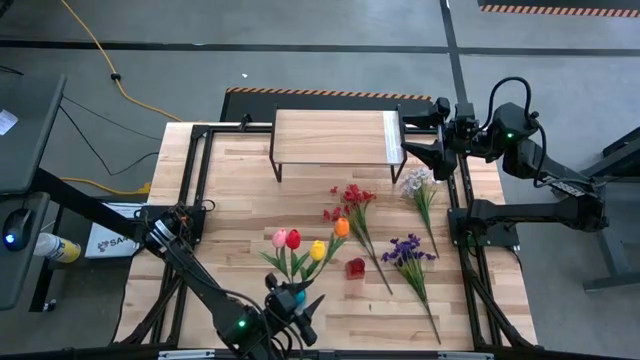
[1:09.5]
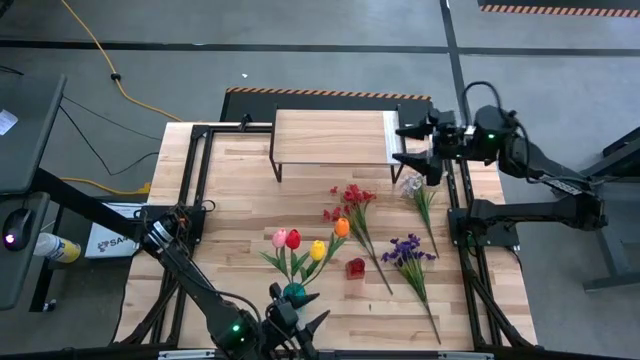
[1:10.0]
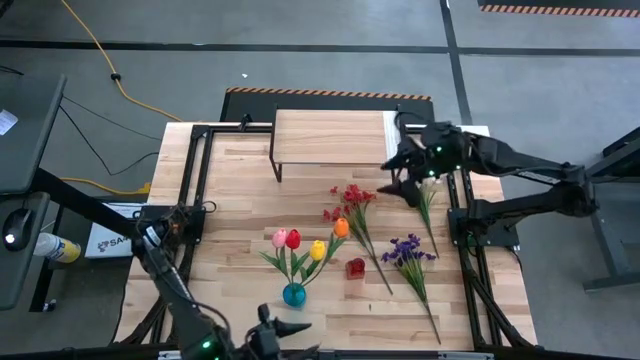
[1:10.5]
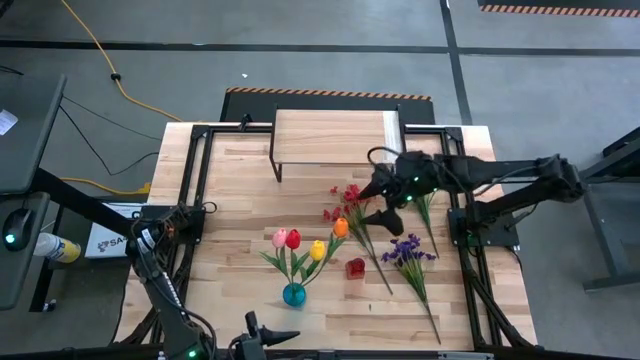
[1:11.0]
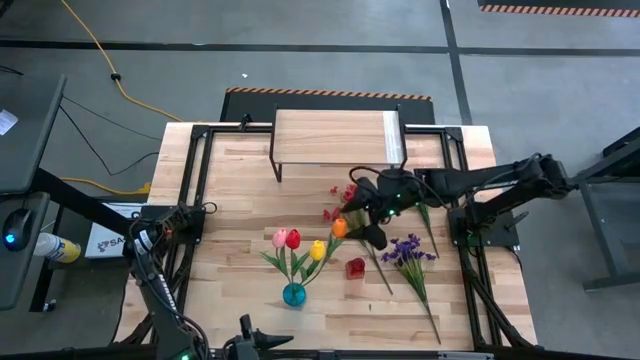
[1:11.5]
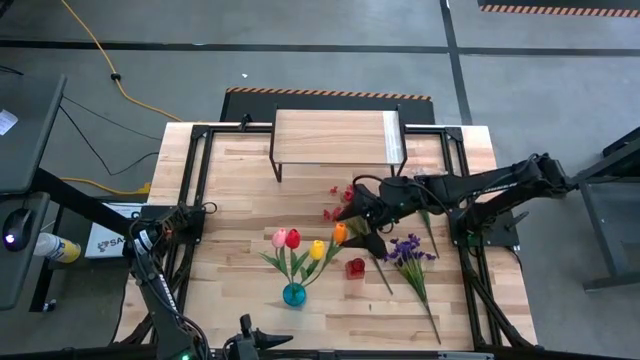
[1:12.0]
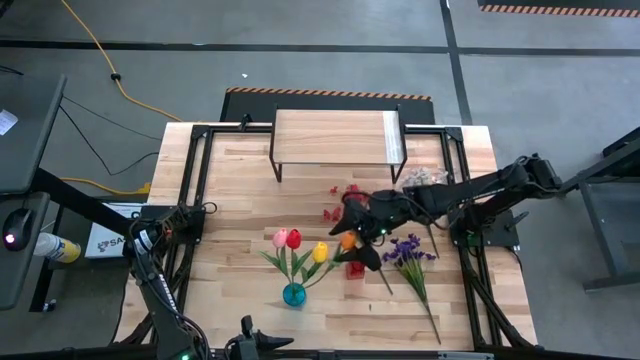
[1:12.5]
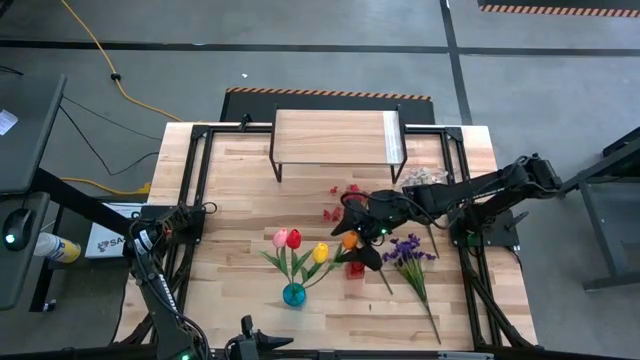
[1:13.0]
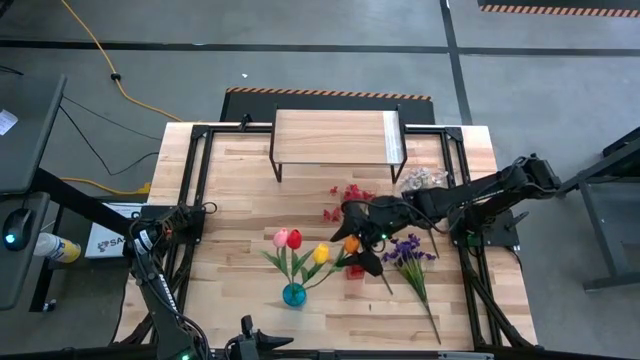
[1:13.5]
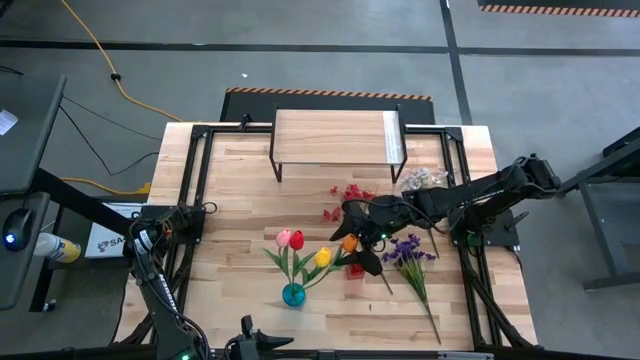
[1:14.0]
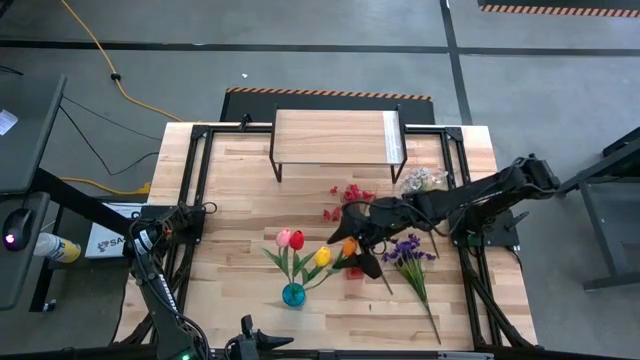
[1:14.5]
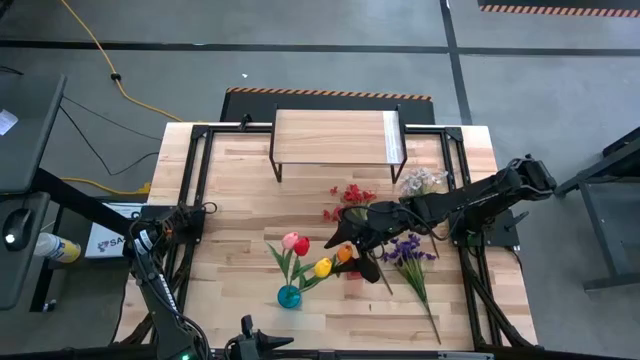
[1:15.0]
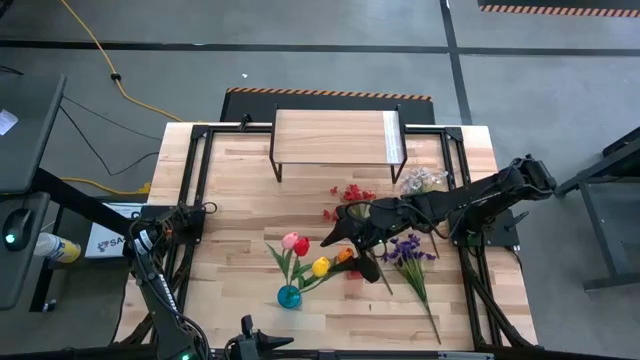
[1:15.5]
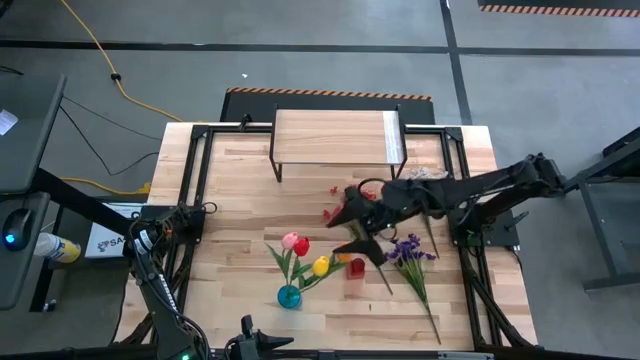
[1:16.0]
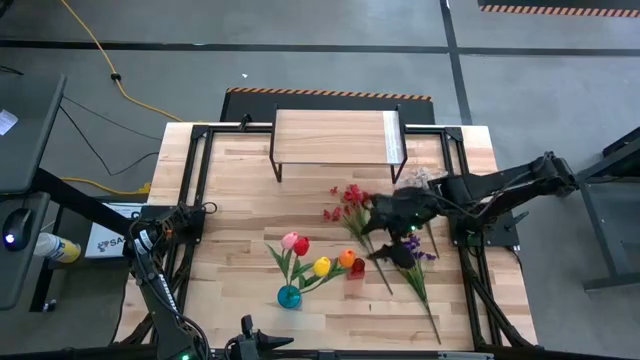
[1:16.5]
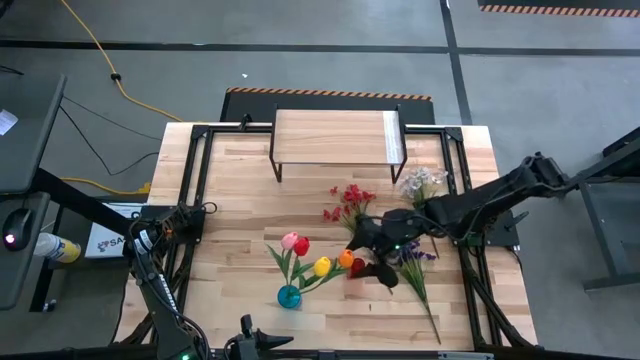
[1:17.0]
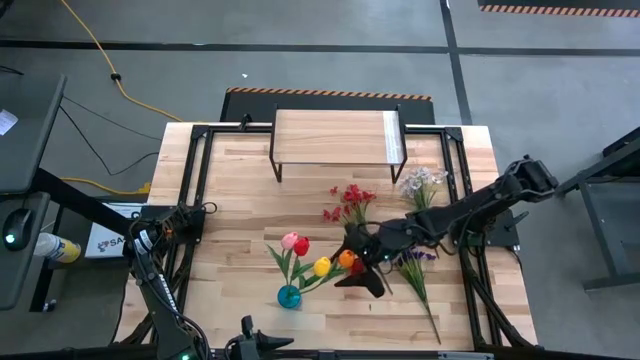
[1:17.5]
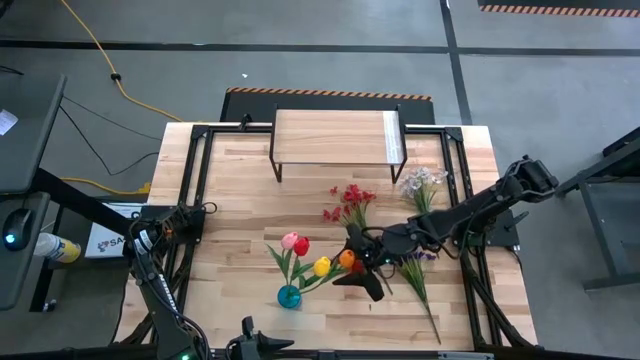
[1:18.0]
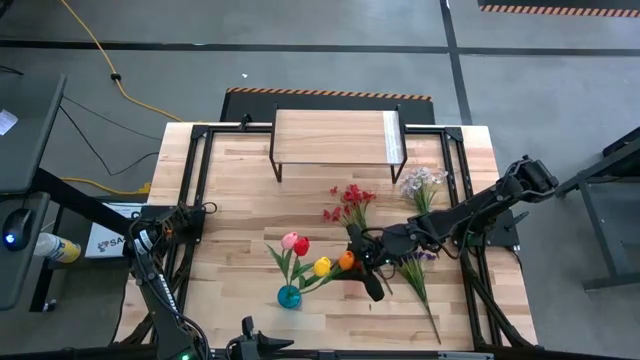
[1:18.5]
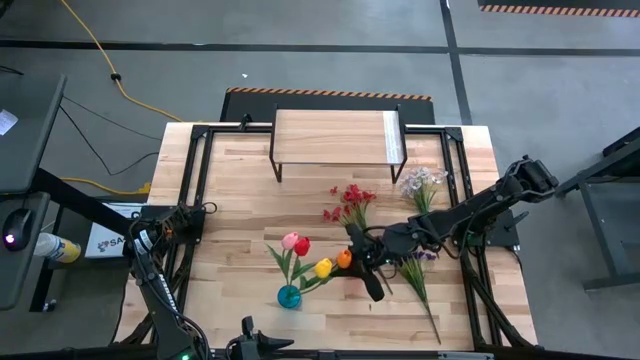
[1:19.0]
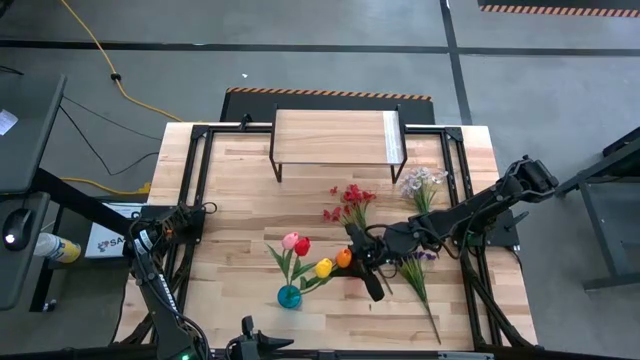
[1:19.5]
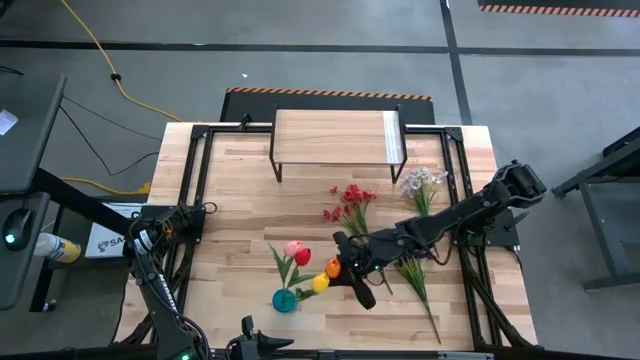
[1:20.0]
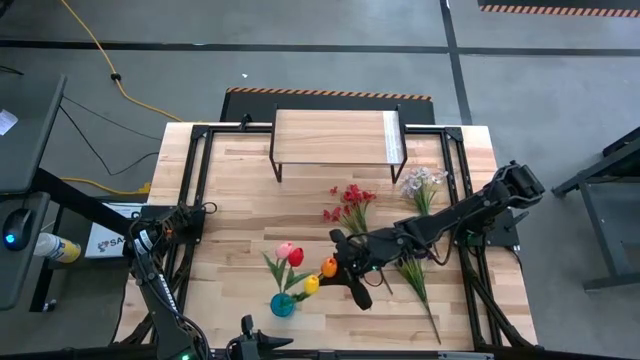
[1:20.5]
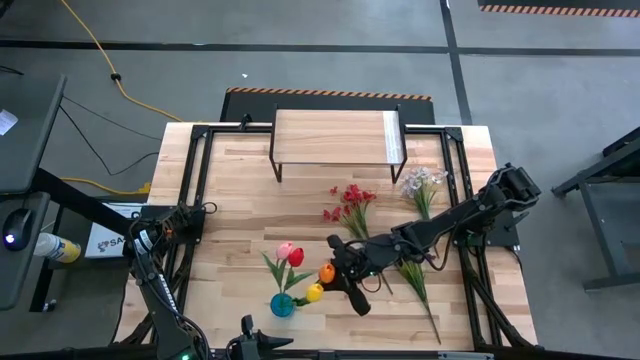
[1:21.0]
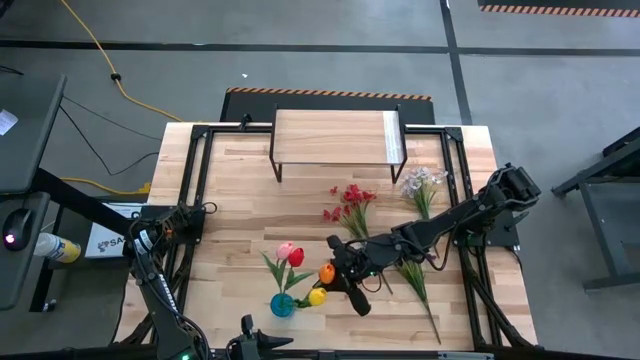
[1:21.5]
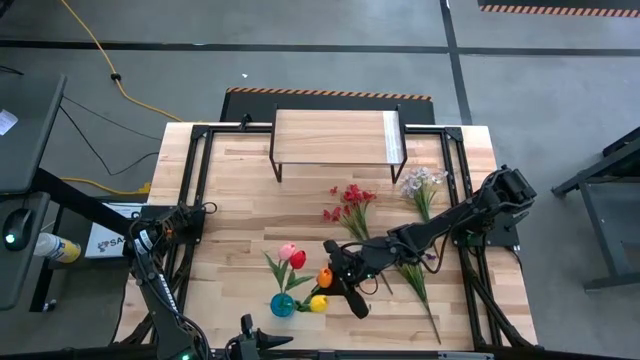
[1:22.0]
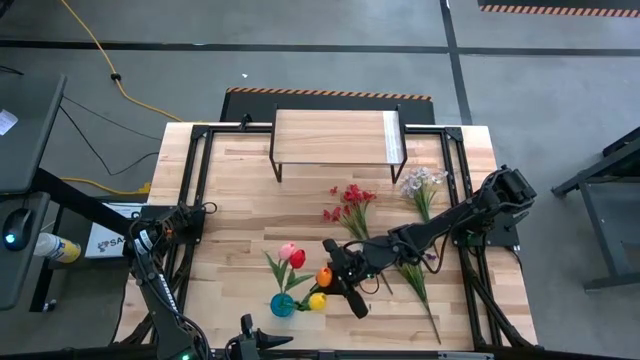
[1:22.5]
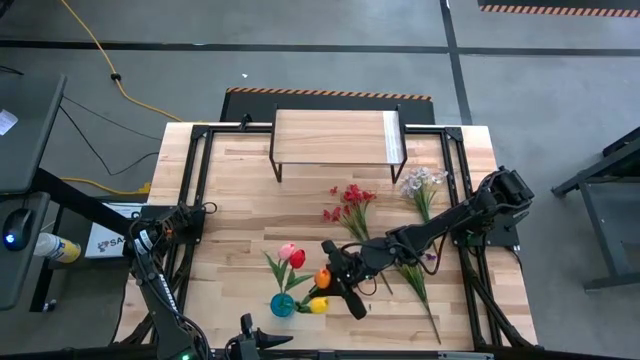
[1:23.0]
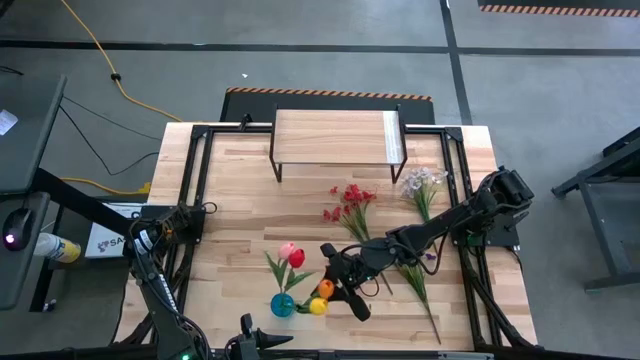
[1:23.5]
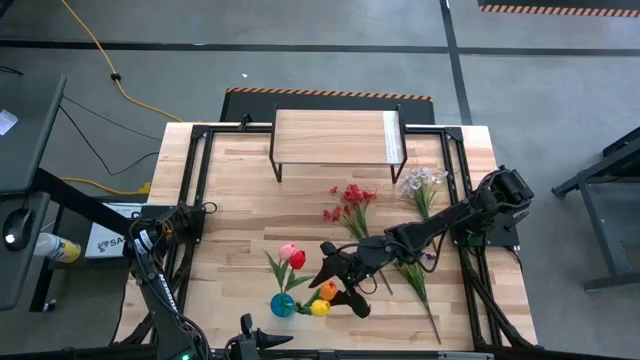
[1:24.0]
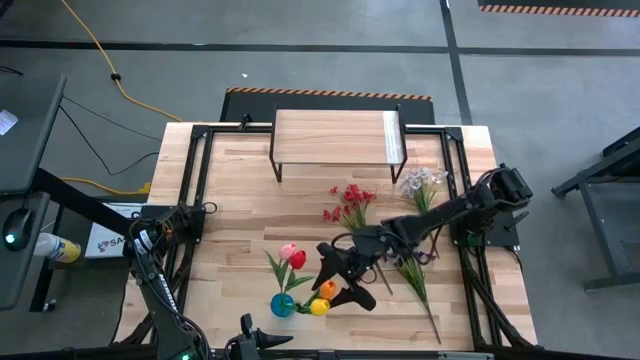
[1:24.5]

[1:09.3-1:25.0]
Task: Pick and place flowers into a vace then onto a shelf
Put the orange tulip into the blue transparent vase

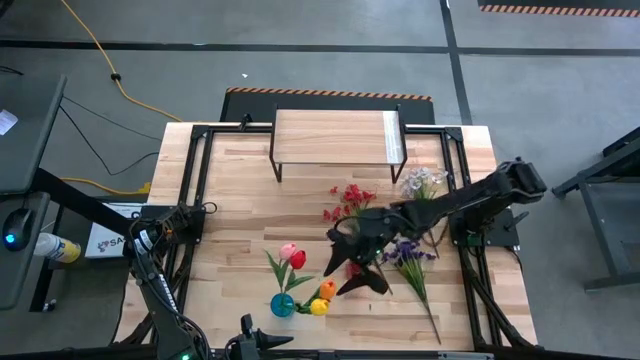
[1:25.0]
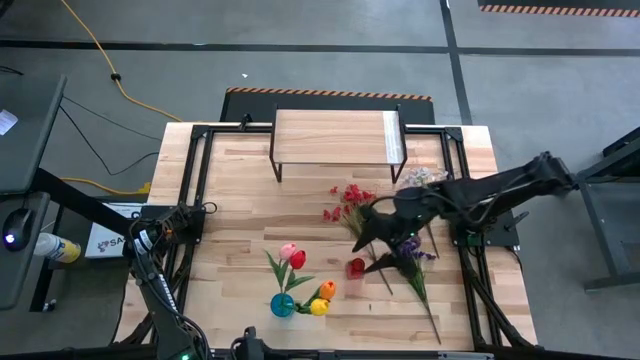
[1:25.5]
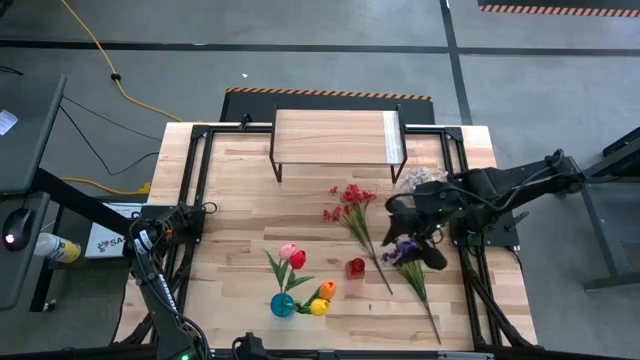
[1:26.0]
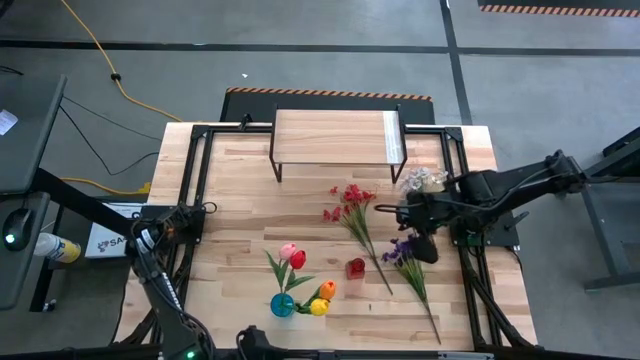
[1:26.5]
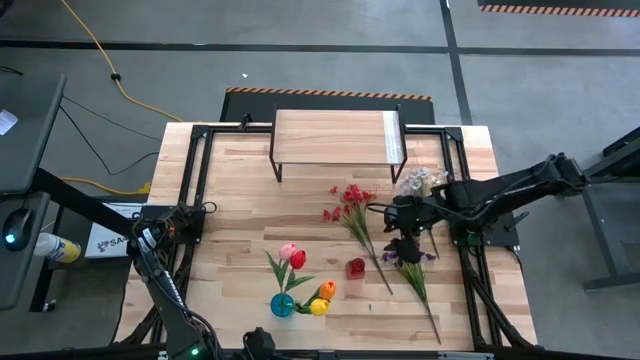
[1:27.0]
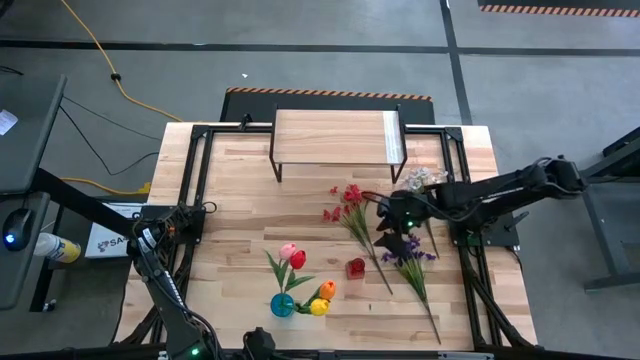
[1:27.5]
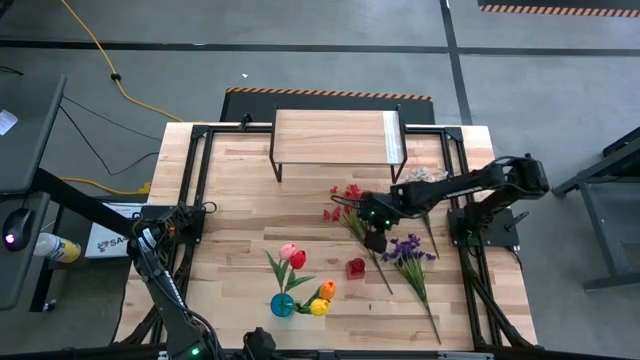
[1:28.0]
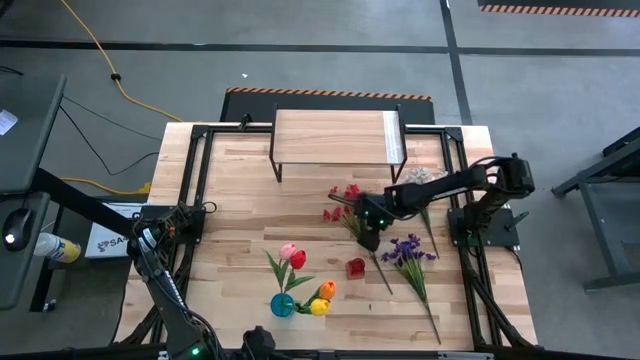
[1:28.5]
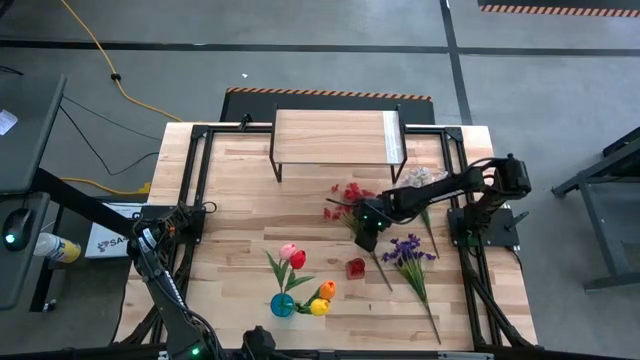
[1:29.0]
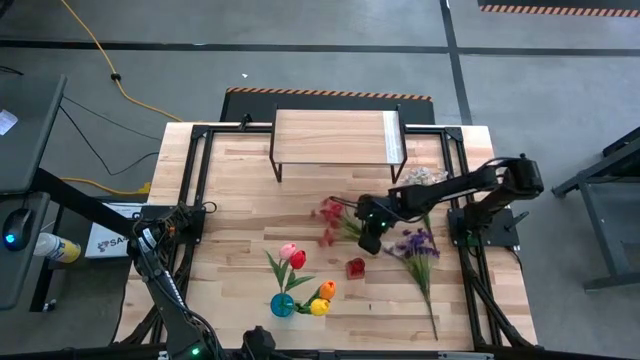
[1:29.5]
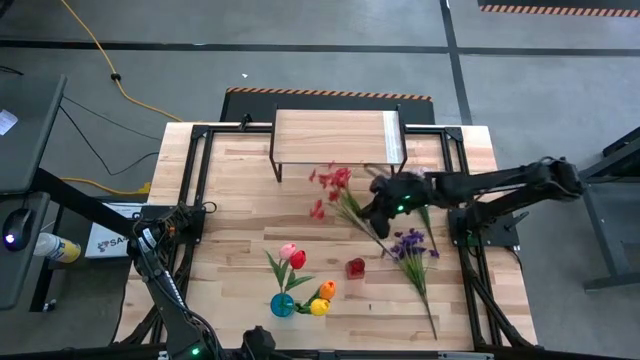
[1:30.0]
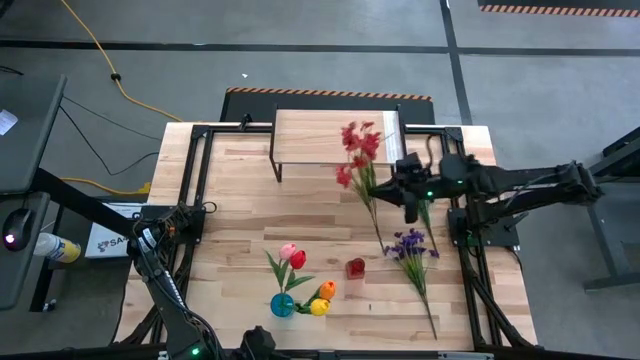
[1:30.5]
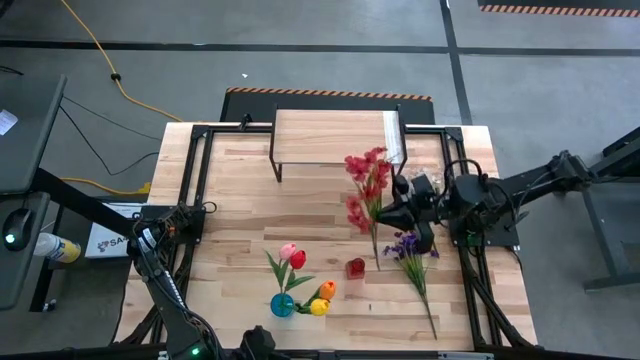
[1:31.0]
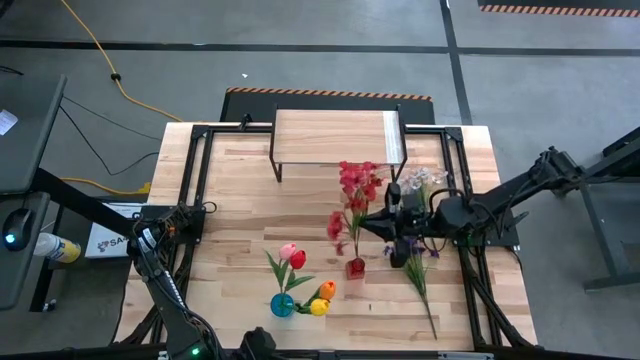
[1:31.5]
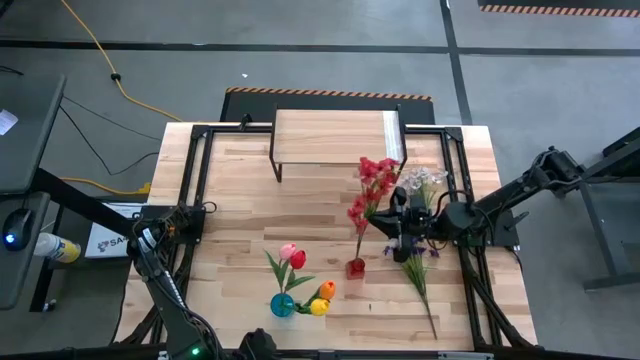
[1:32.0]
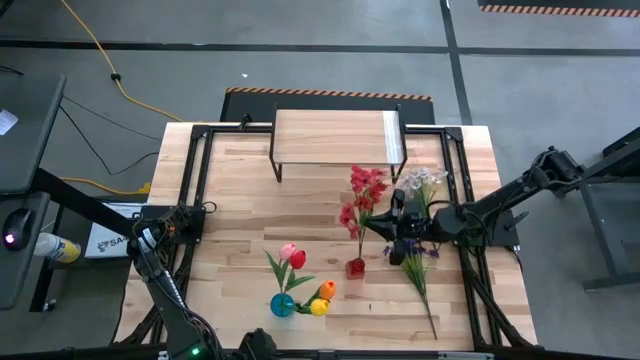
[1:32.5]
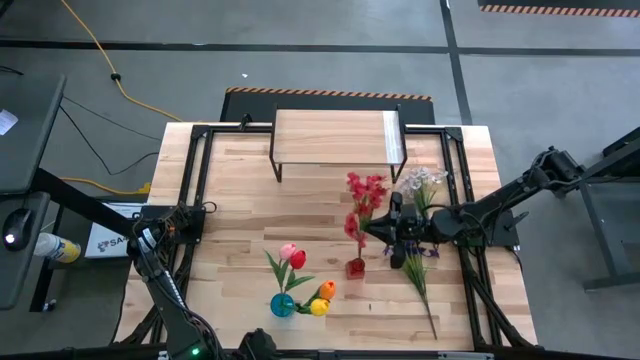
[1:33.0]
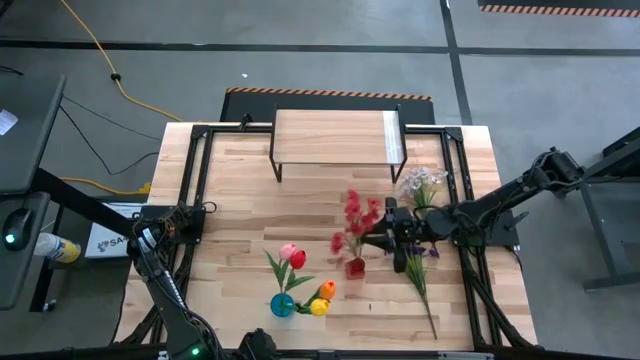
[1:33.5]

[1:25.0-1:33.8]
Put the red flowers into the red transparent vase
